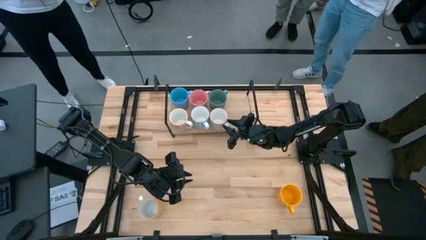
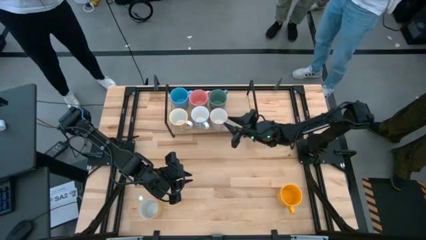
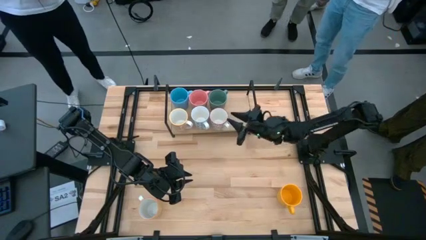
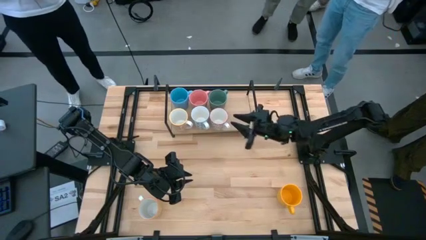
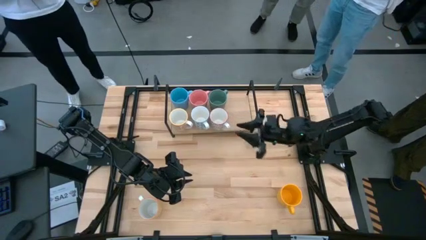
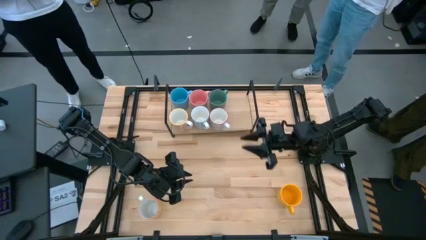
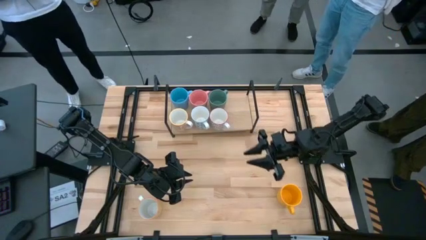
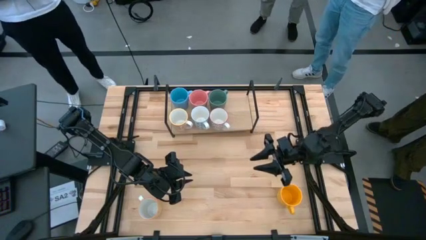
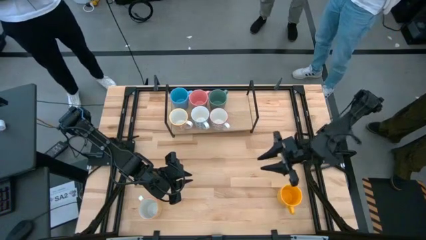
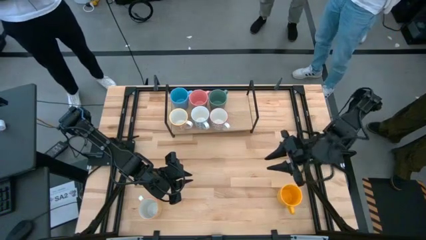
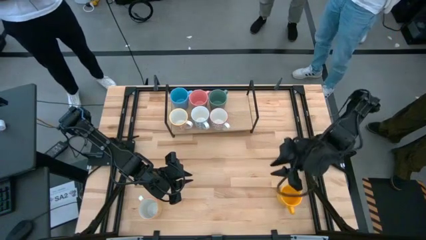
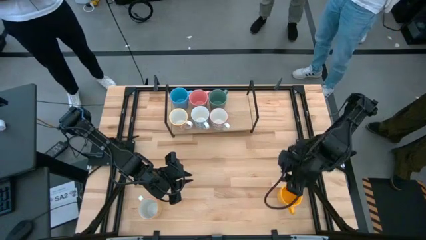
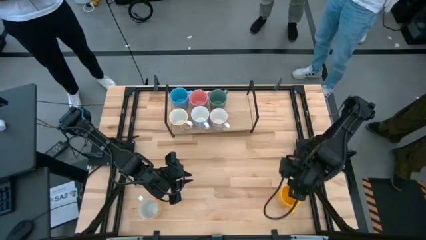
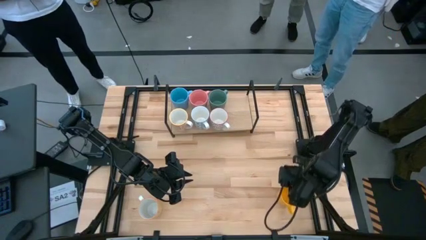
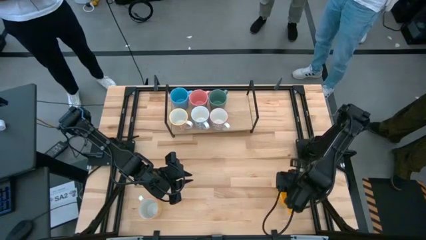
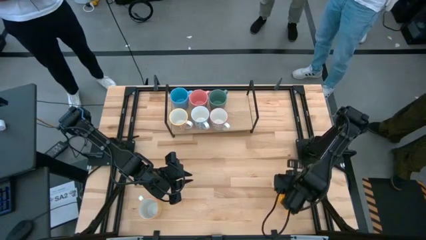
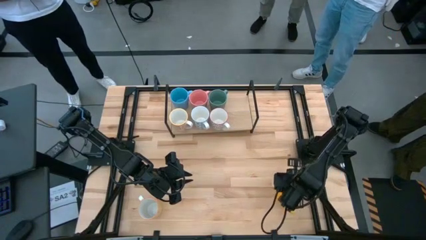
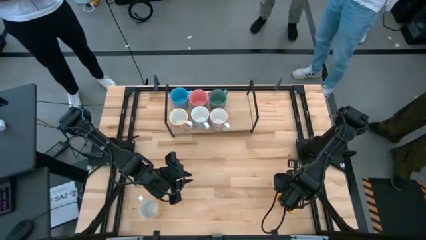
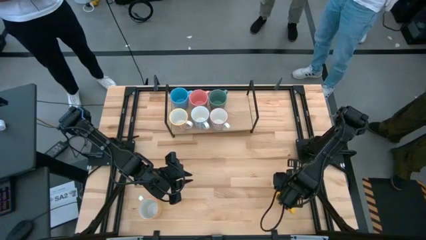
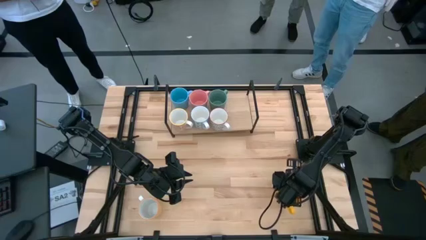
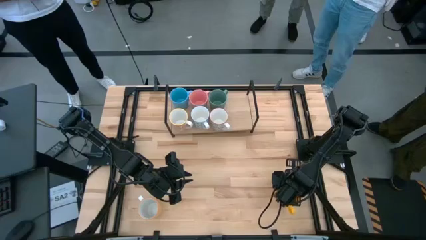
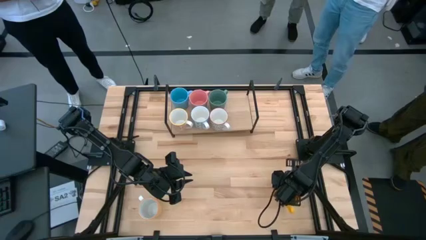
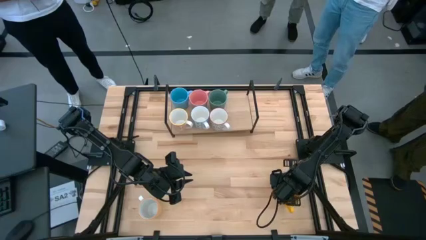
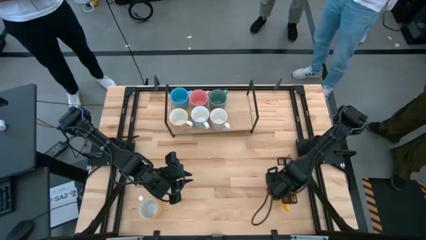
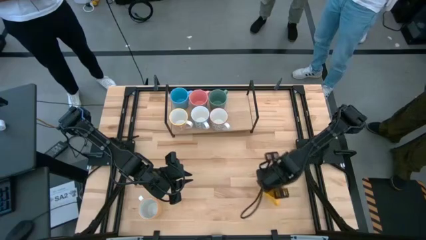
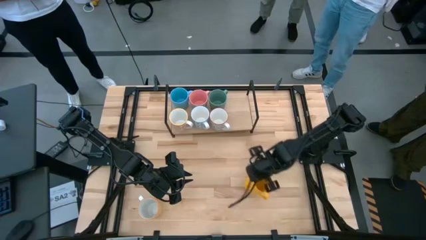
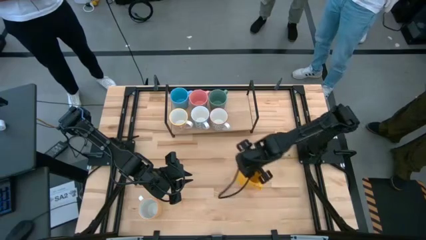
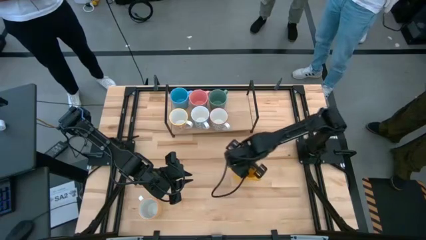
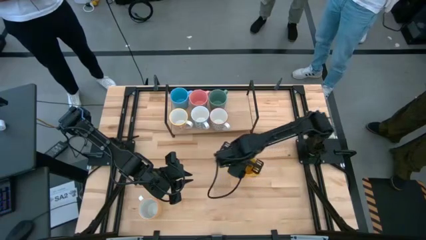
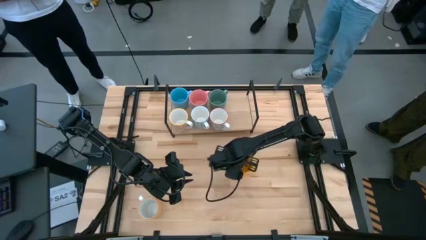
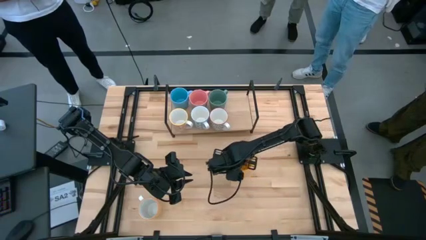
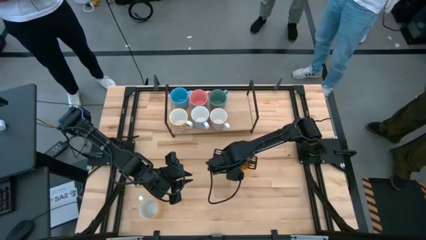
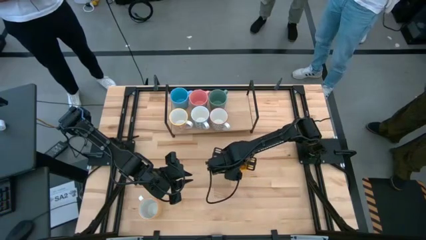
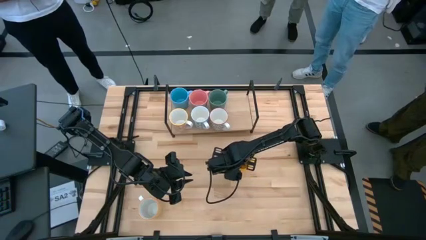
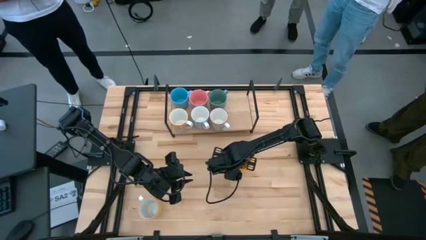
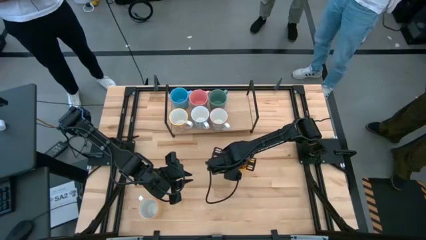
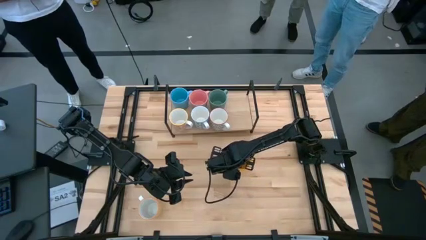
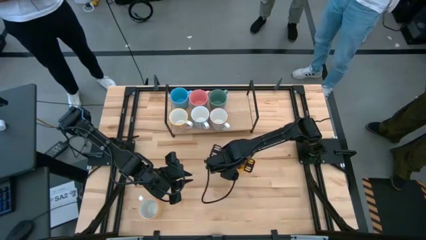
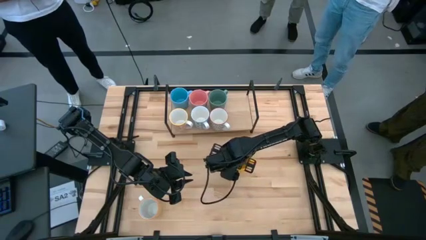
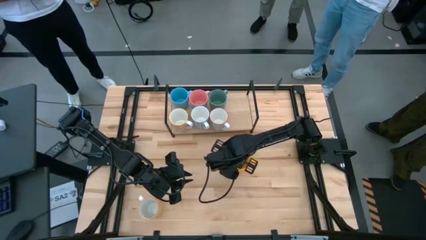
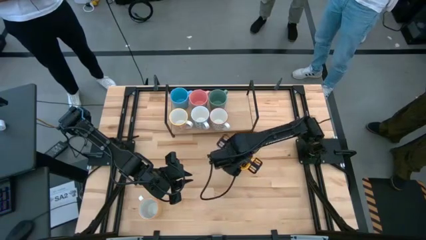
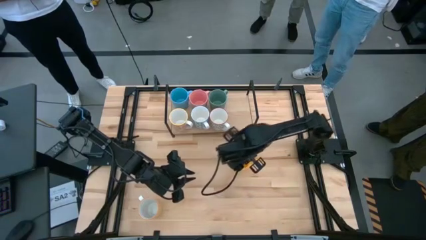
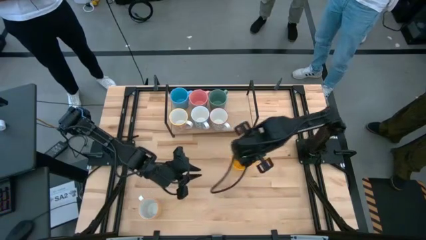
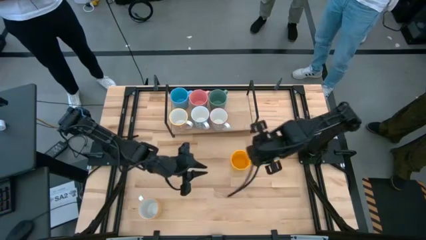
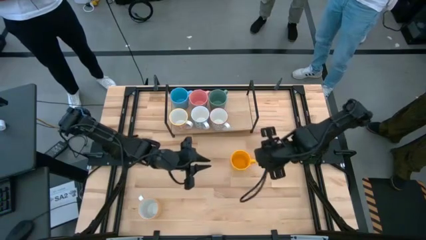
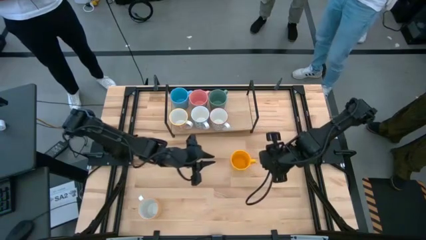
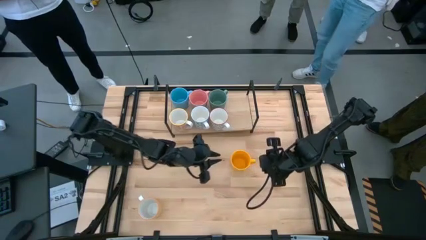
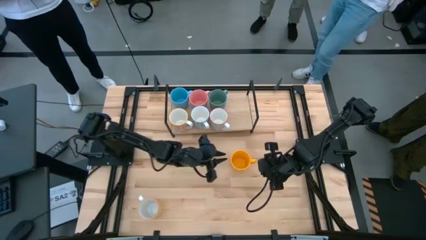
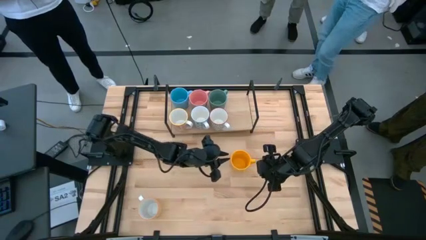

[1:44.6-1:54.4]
Task: Place coffee mugs
Put the yellow mug on the shelf

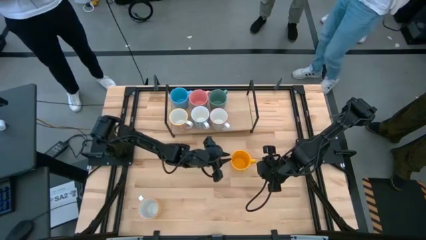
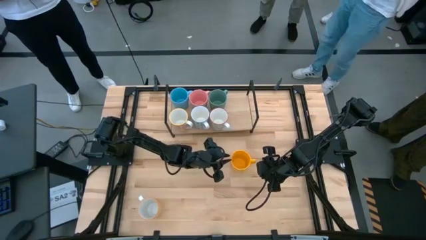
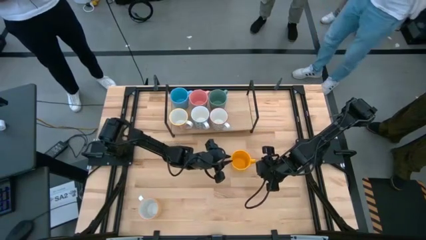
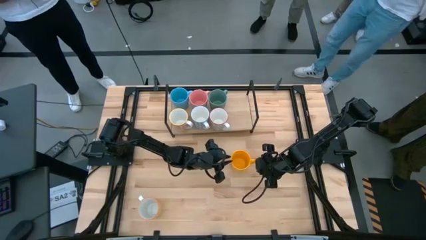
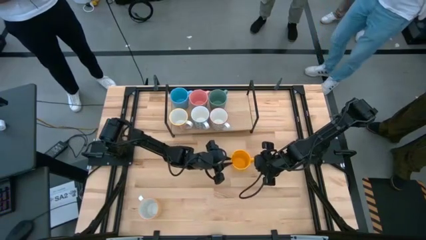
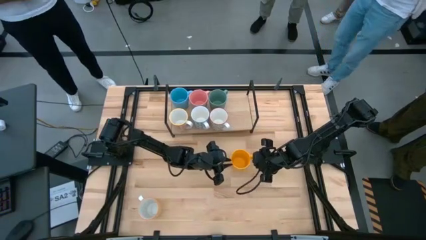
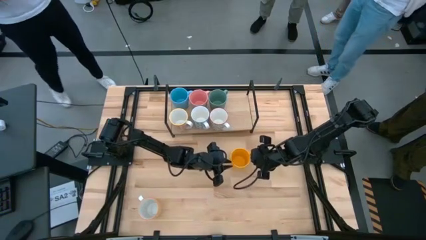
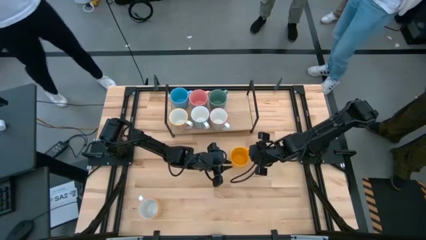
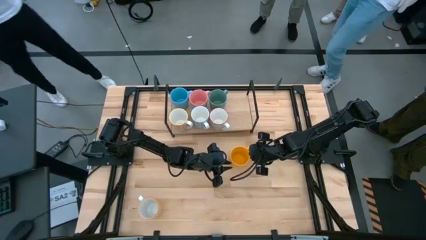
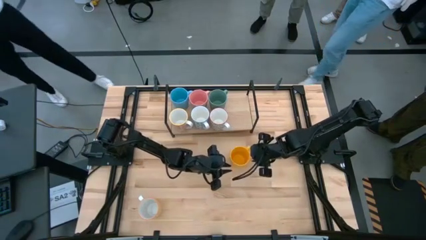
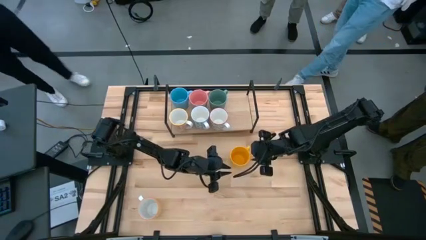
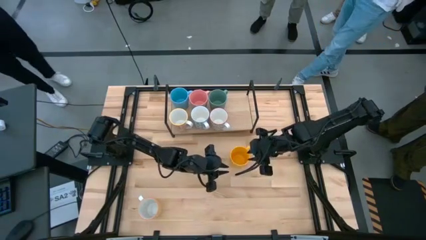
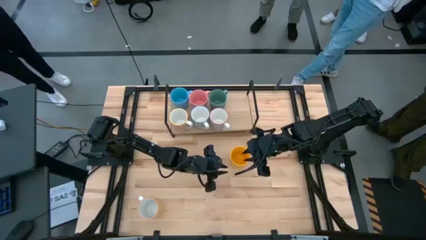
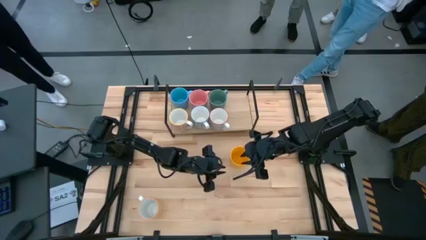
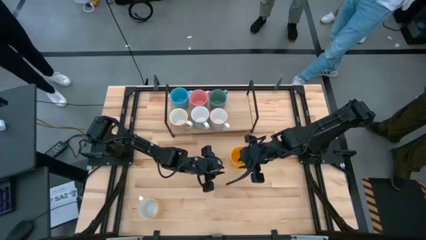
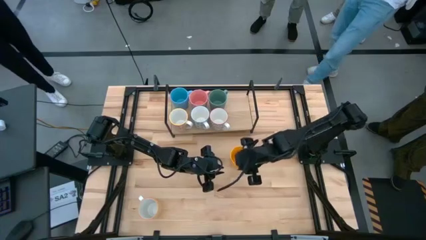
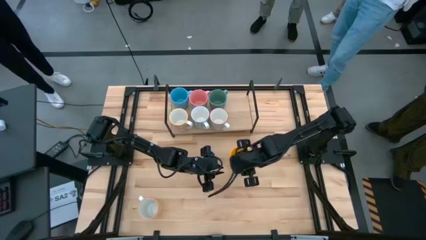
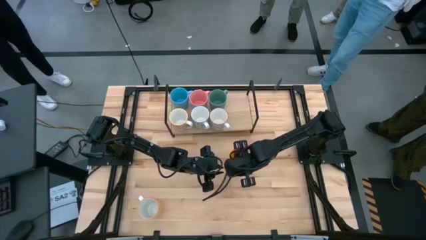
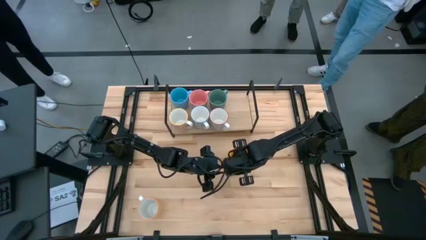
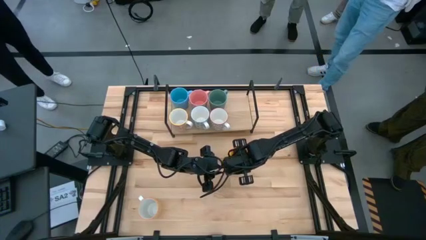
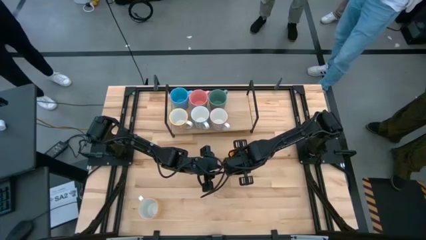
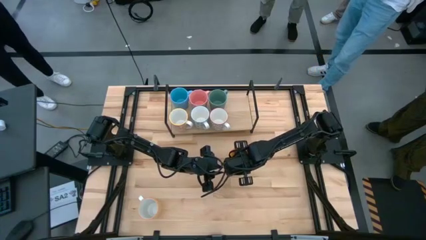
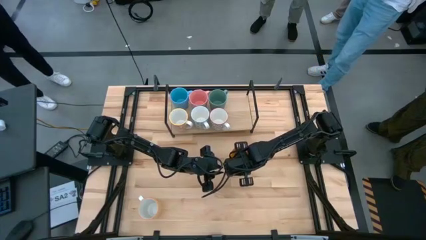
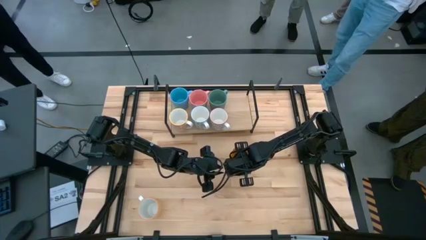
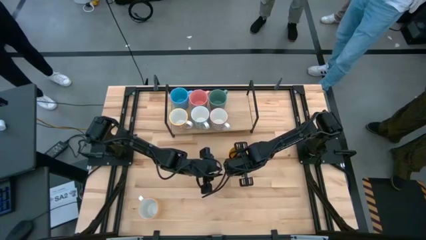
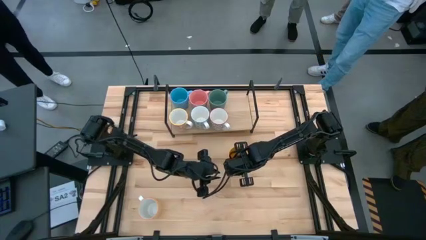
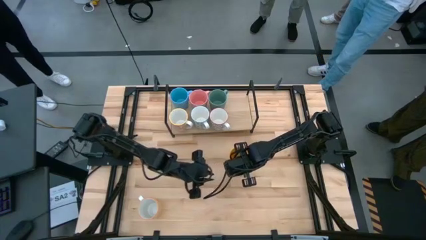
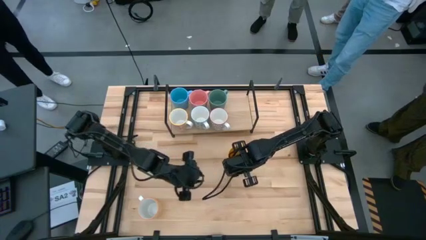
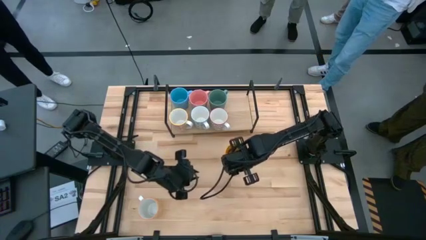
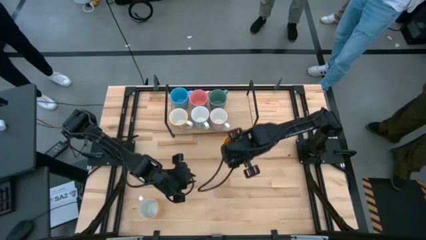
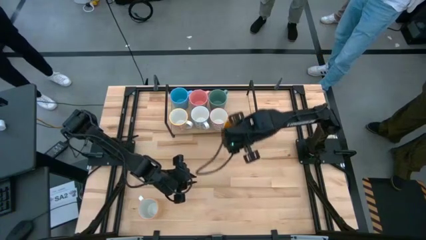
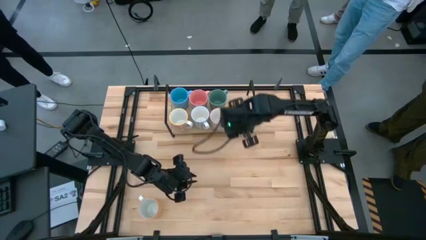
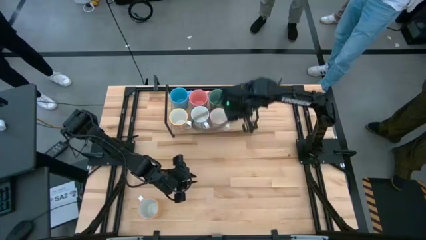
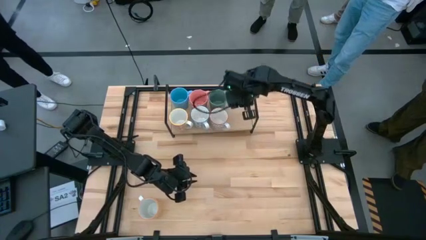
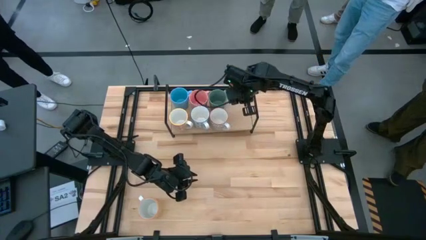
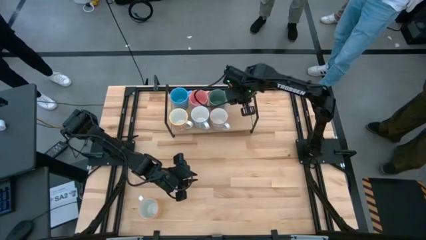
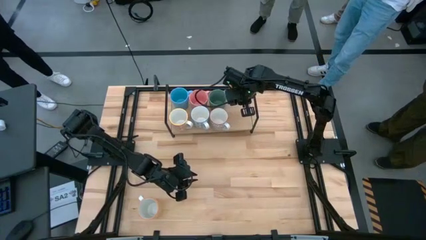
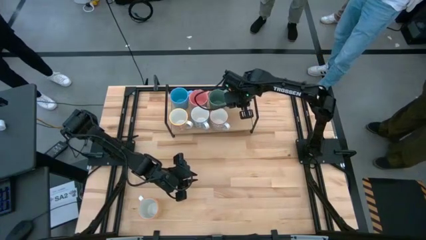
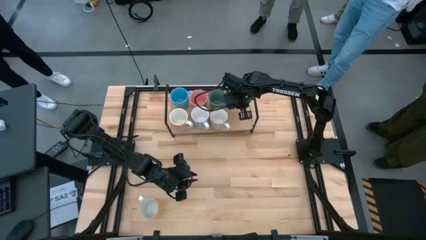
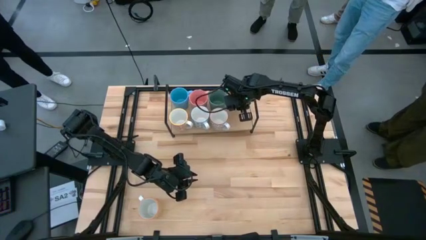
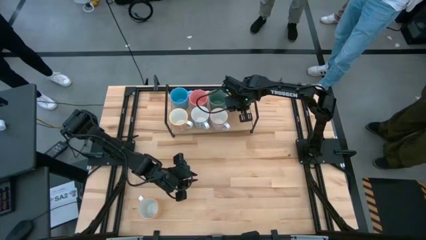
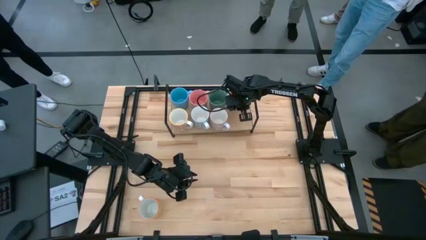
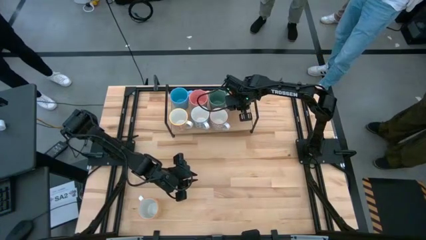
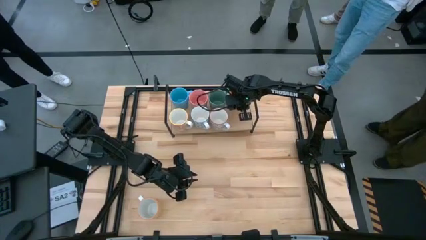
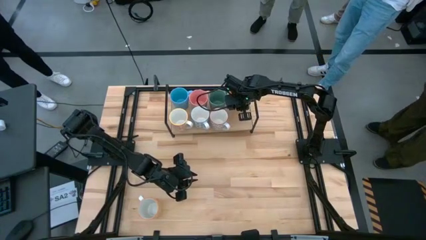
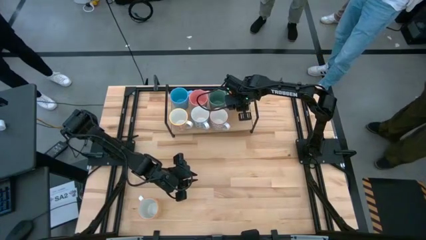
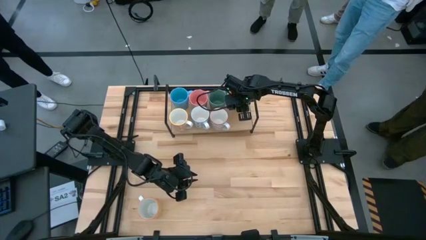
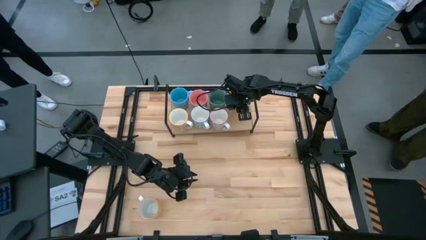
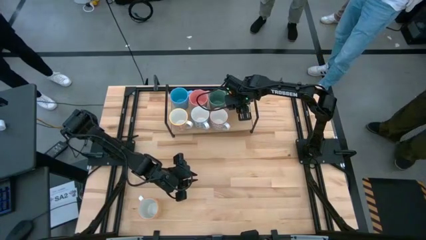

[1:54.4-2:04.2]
Put the yellow mug on the shelf
